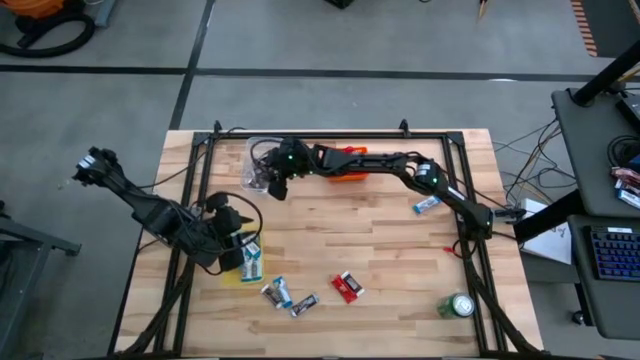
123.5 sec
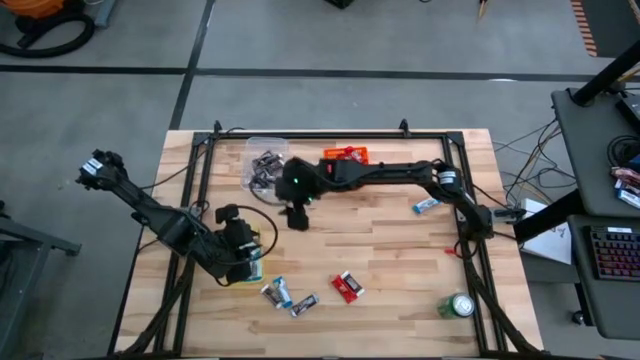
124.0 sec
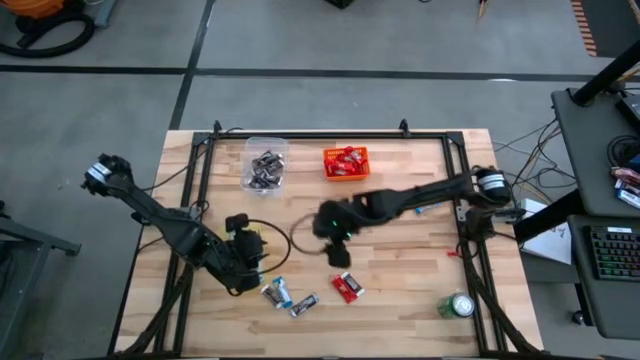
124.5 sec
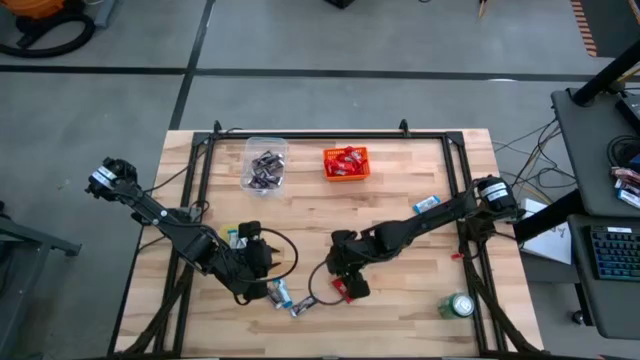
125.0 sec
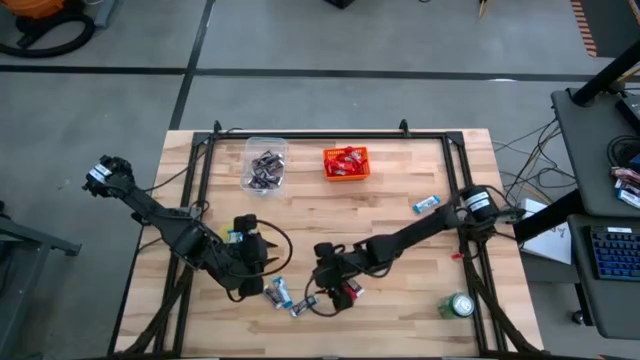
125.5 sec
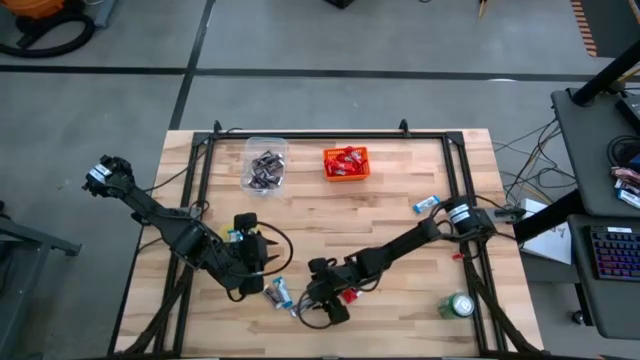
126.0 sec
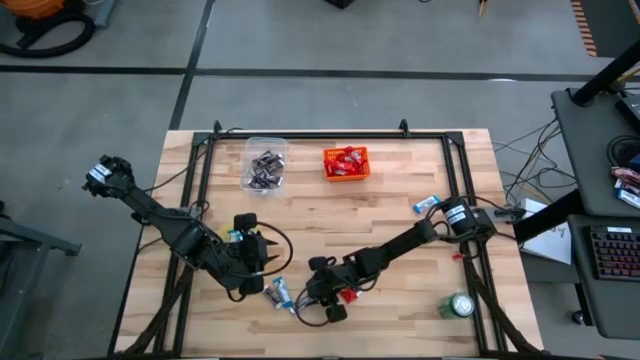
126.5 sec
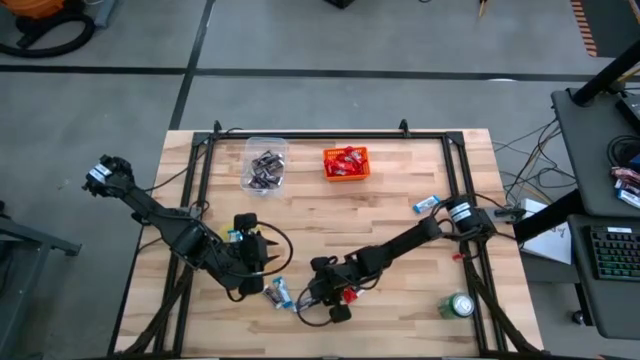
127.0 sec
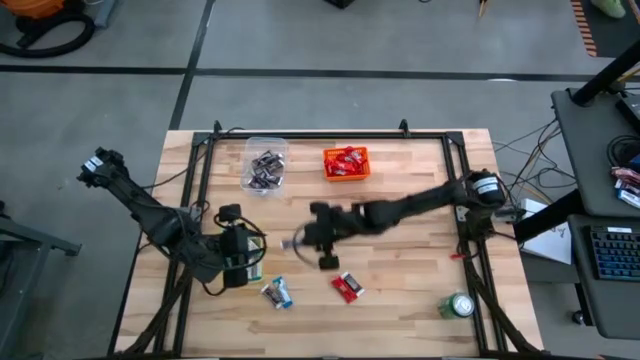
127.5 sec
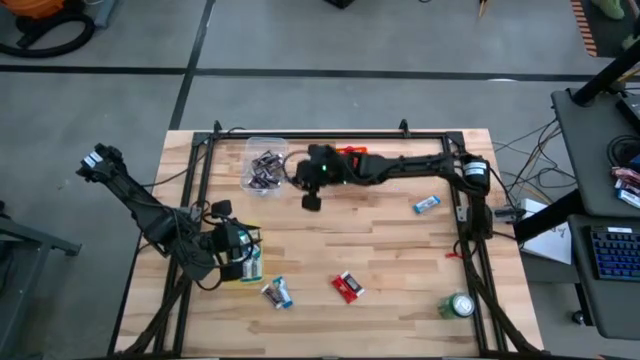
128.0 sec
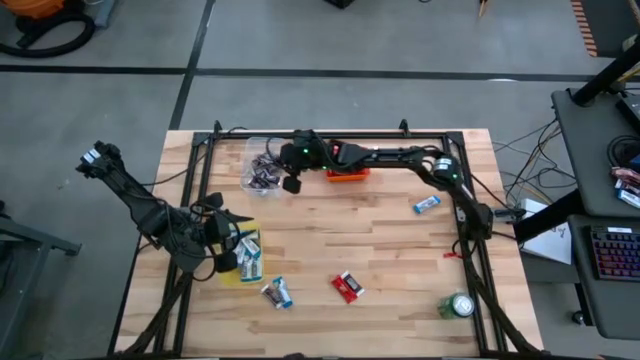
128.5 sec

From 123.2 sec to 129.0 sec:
Task: Sort candy
Put the bottom center brown into the transparent bin

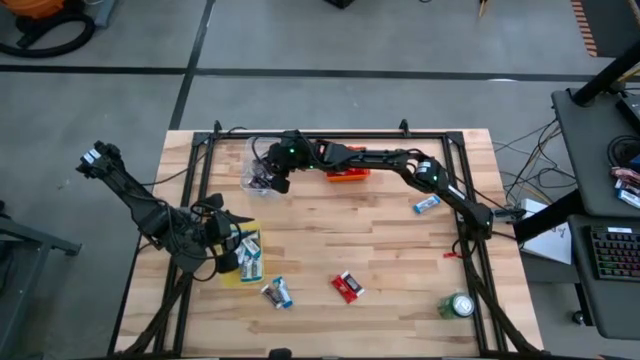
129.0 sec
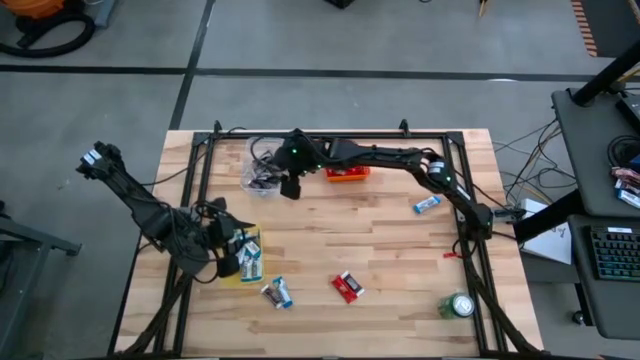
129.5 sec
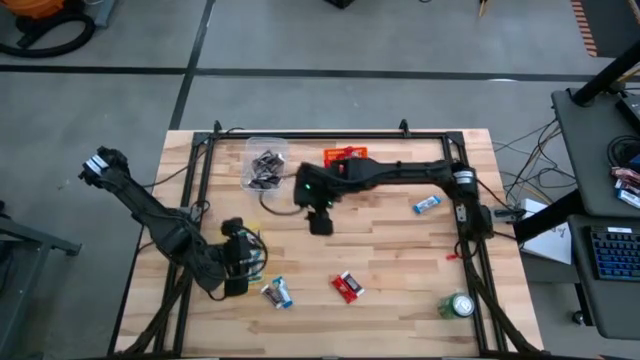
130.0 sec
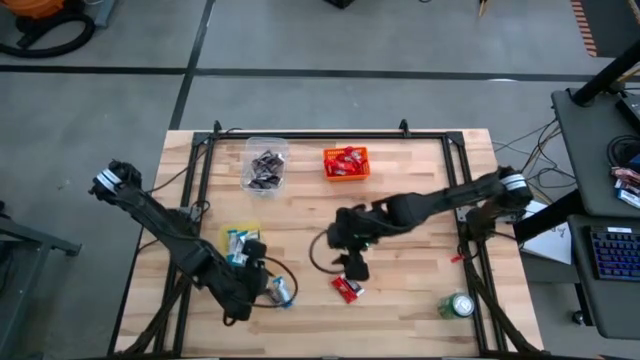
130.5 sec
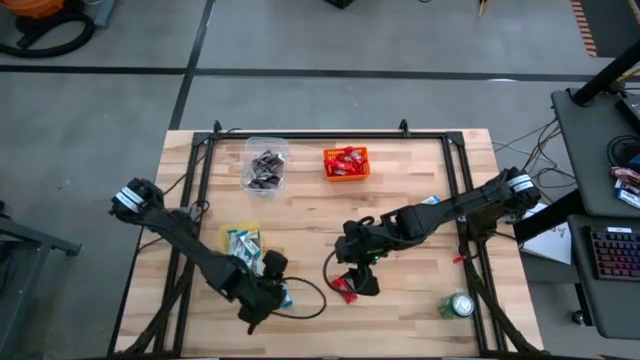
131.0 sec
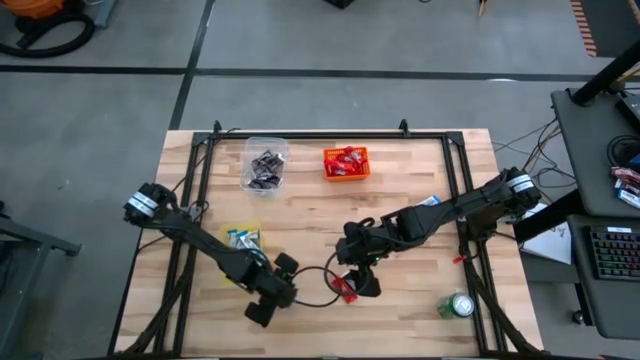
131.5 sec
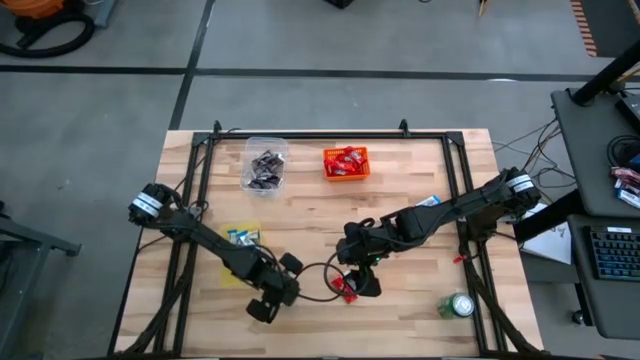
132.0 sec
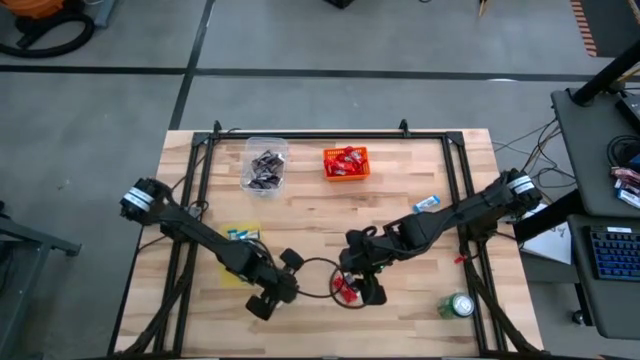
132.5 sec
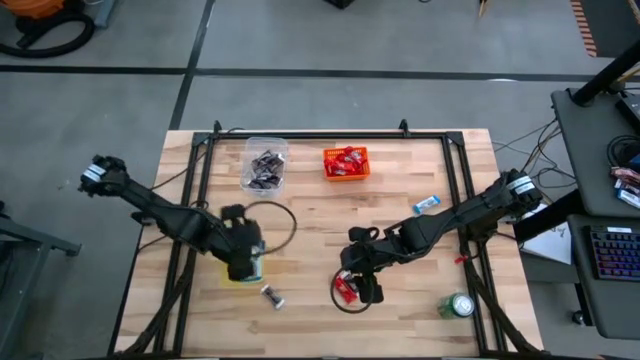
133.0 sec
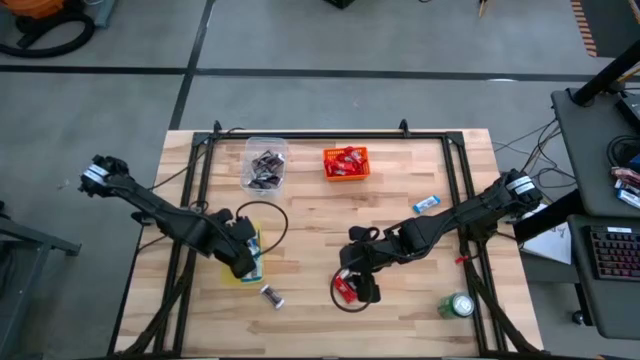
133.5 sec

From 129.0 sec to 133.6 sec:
Put the left white candy into the yellow bin

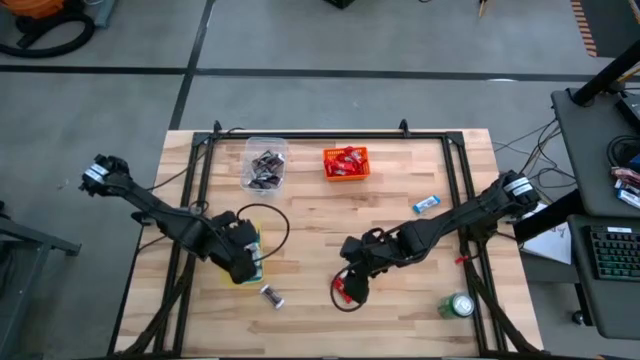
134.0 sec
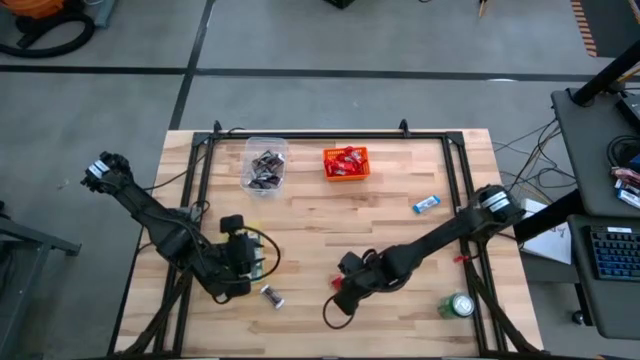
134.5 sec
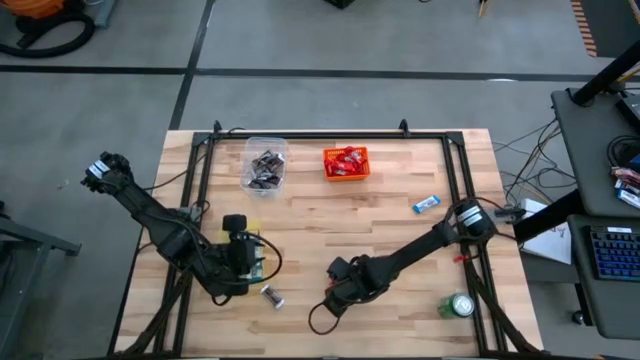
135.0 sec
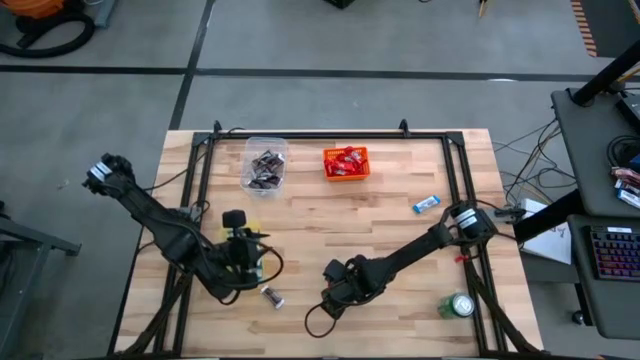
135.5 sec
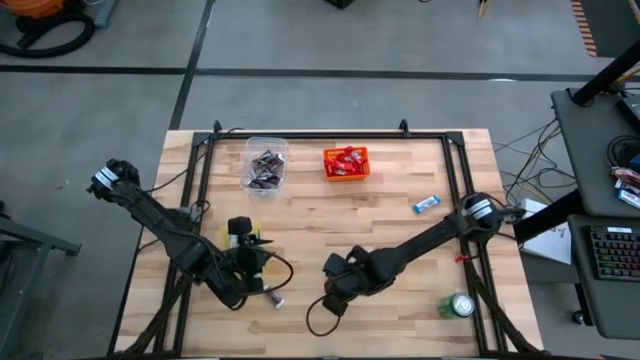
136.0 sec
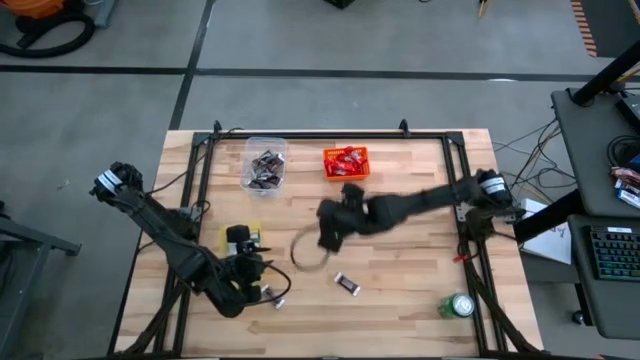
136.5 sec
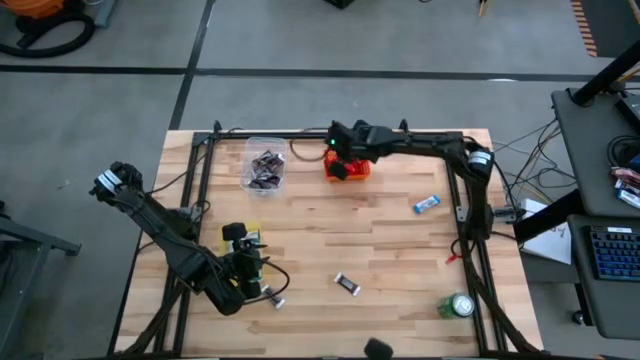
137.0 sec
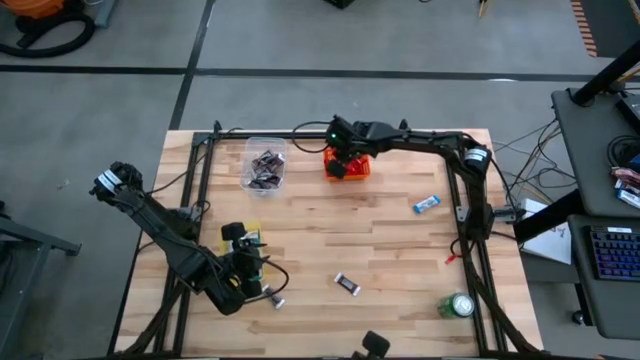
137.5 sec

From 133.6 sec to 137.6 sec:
Put the red candy into the orange basket

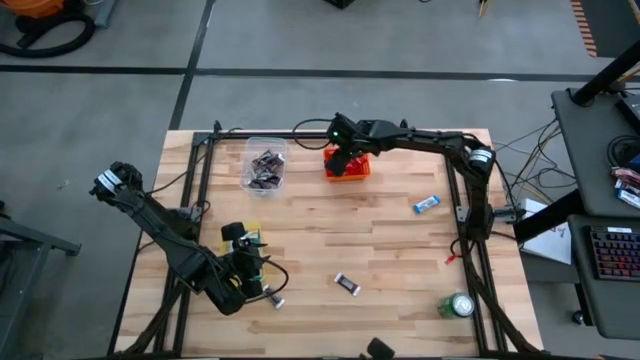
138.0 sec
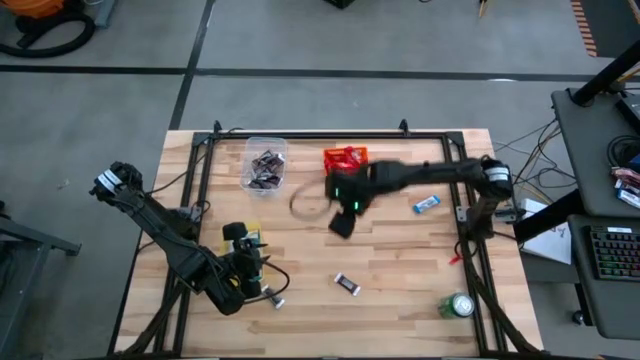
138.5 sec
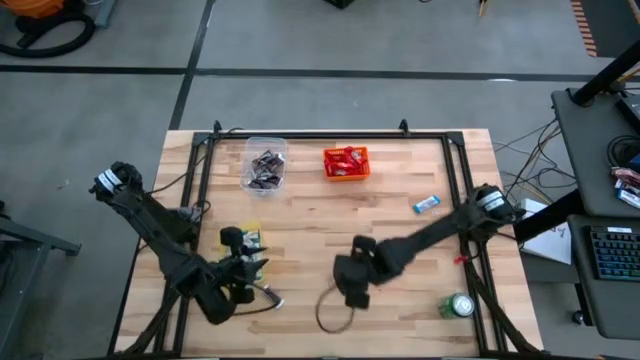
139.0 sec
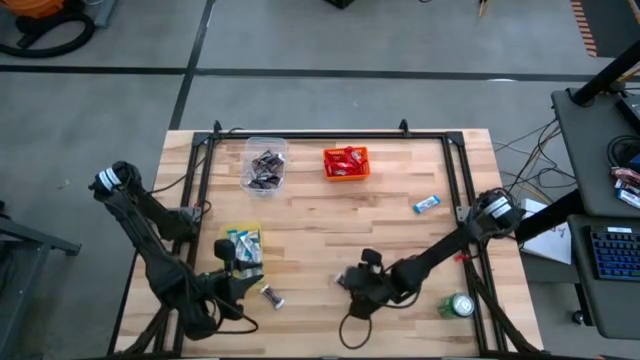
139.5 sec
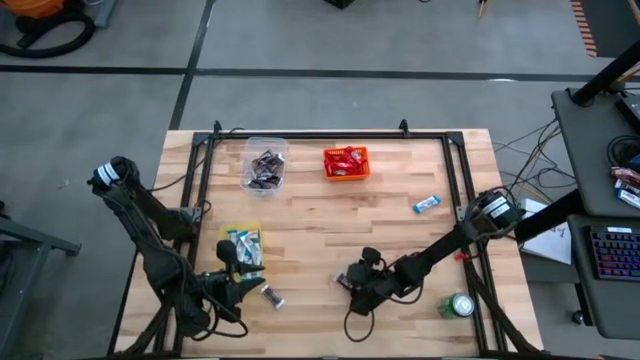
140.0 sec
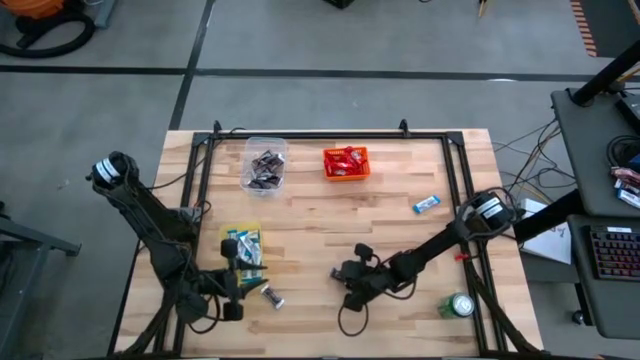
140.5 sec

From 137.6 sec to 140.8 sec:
Put the right brown candy into the transparent bin

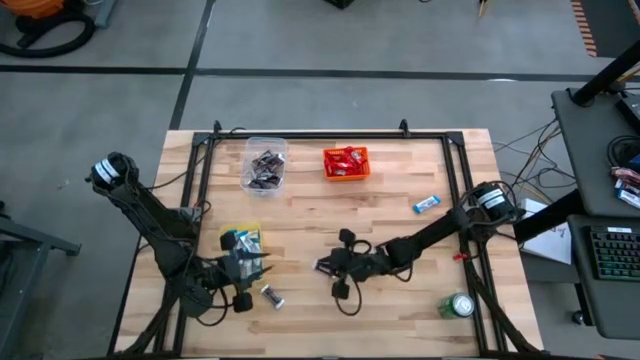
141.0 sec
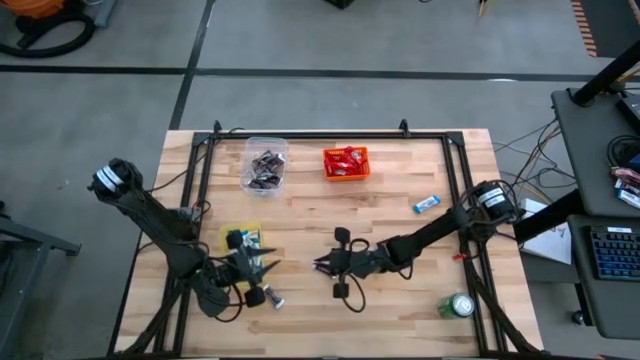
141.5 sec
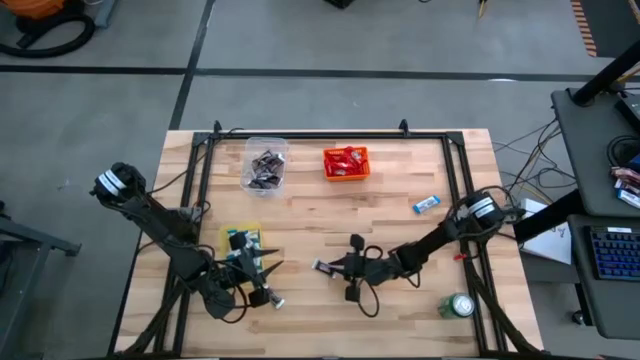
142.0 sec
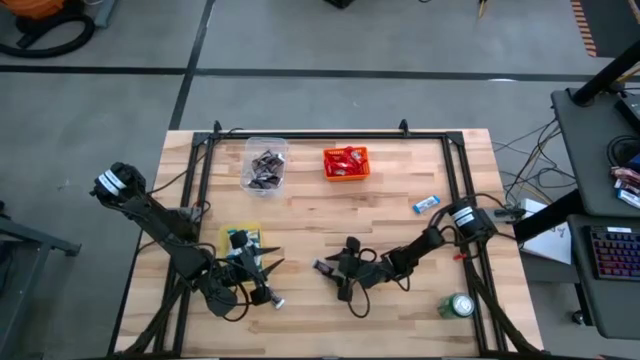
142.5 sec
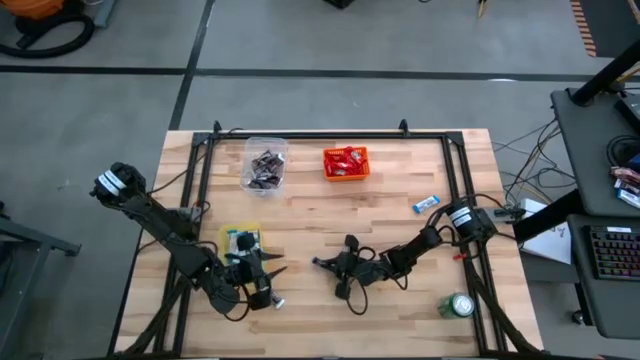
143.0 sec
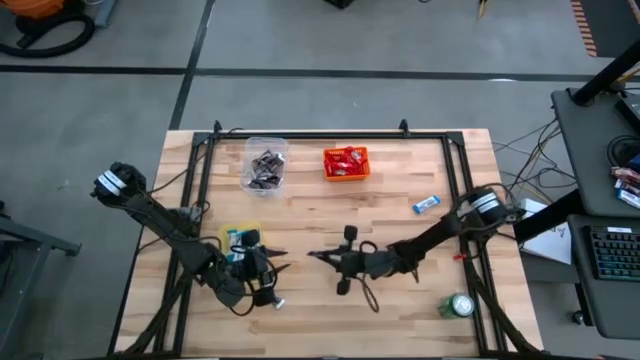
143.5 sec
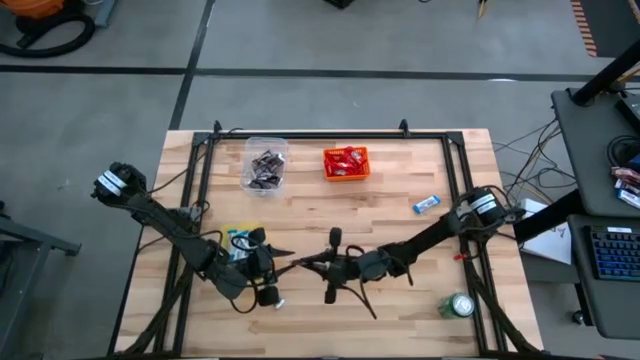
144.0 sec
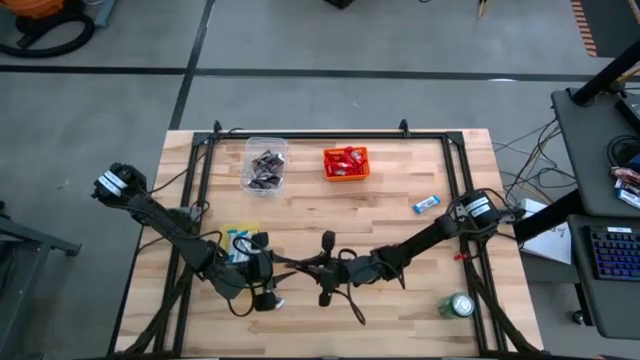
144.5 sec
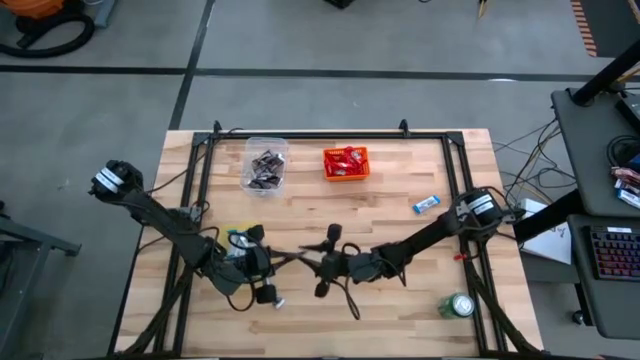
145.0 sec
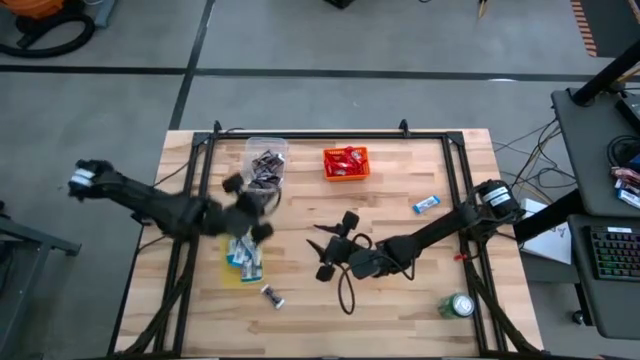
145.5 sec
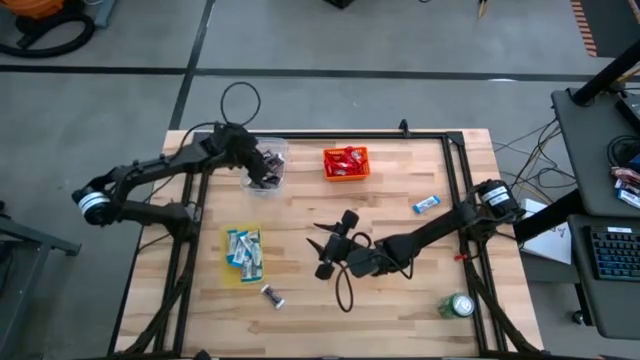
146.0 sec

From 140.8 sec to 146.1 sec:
Put the right brown candy into the transparent bin
